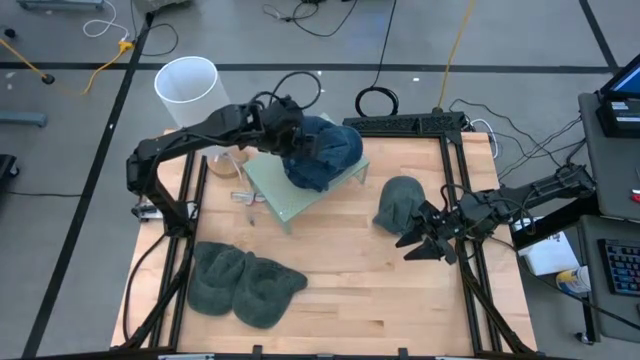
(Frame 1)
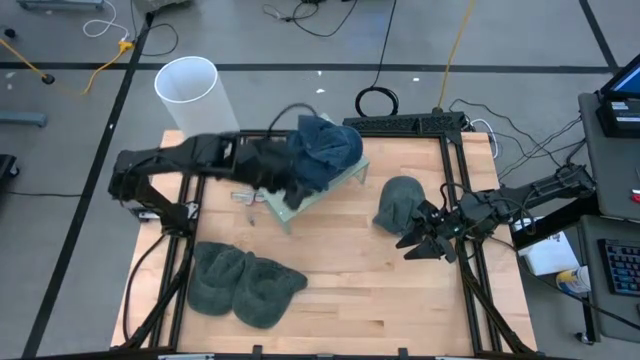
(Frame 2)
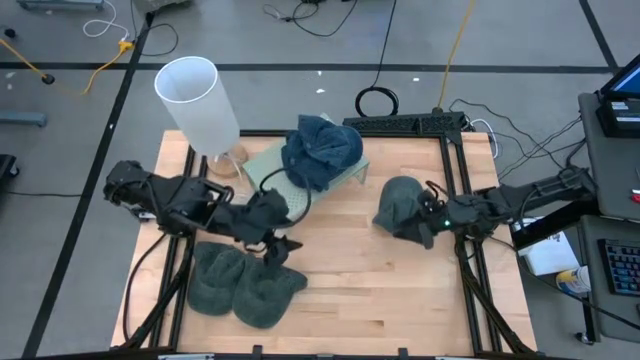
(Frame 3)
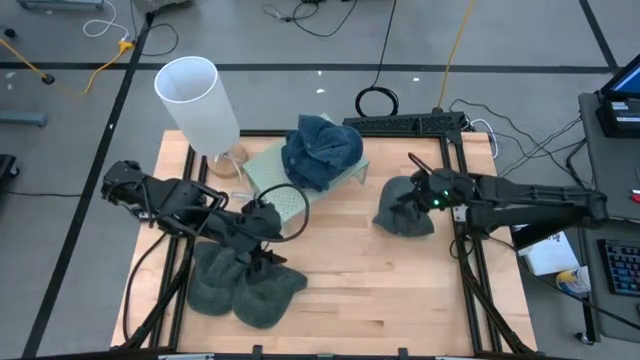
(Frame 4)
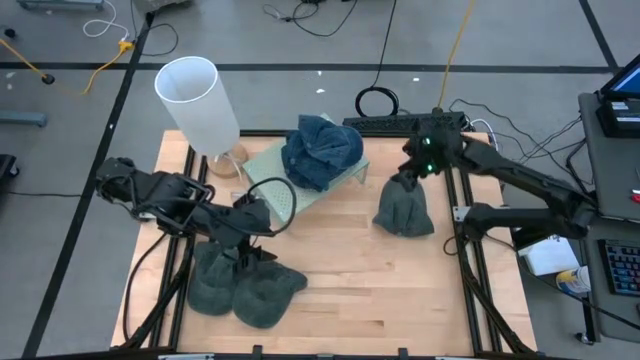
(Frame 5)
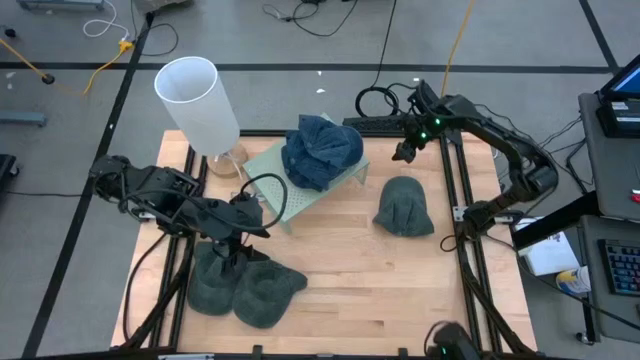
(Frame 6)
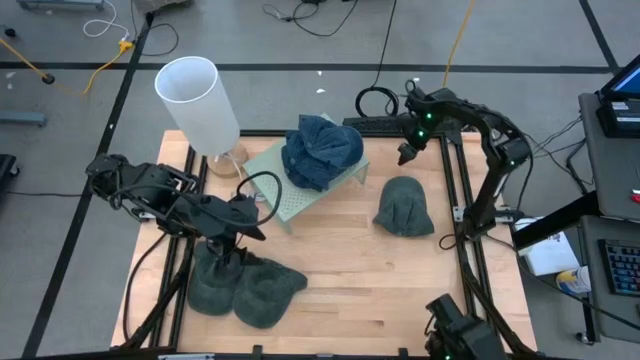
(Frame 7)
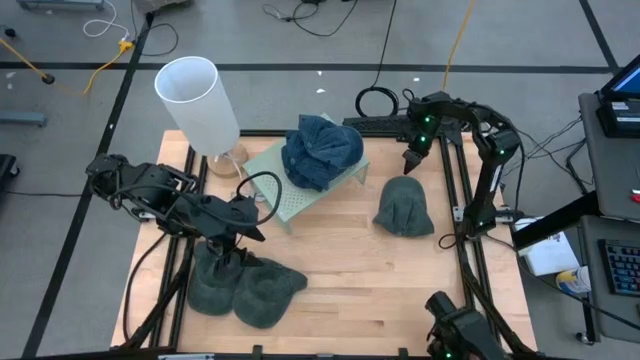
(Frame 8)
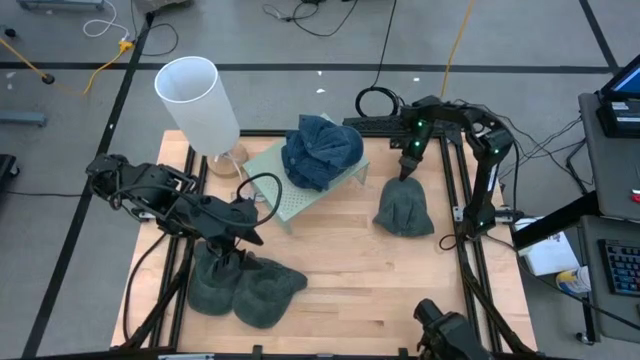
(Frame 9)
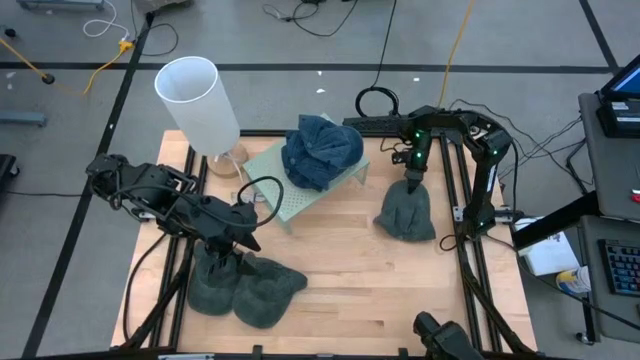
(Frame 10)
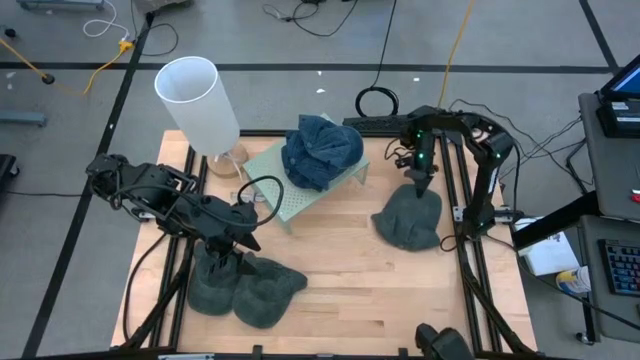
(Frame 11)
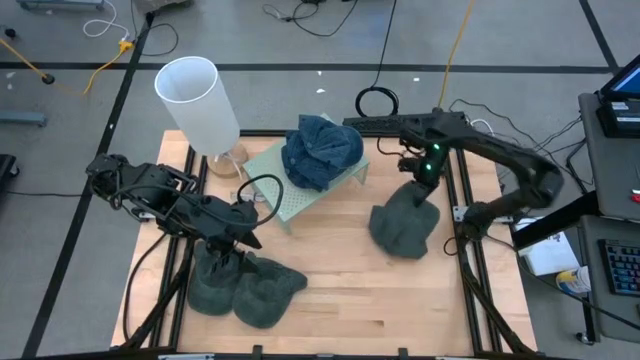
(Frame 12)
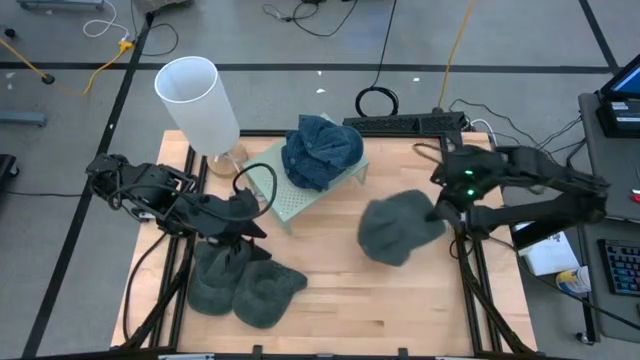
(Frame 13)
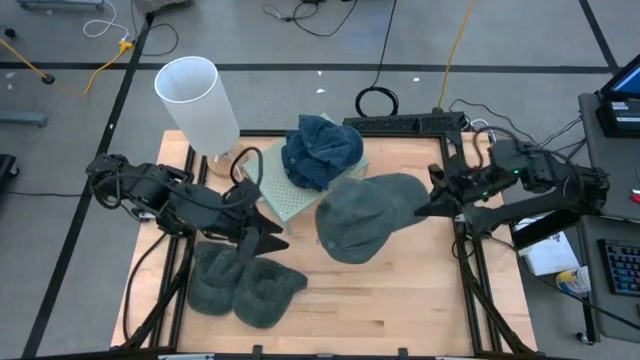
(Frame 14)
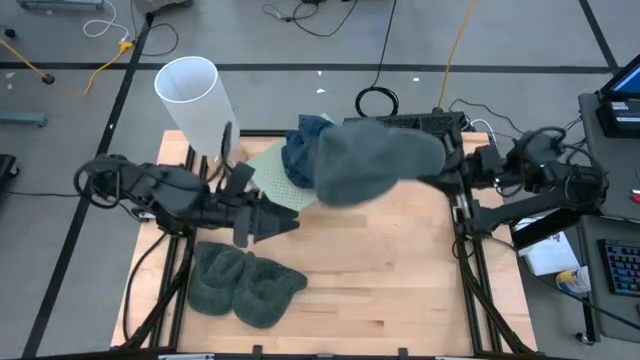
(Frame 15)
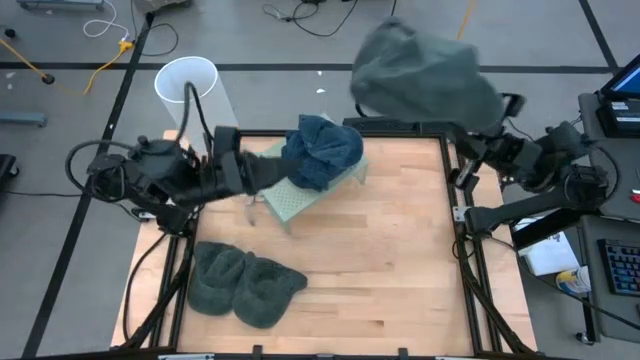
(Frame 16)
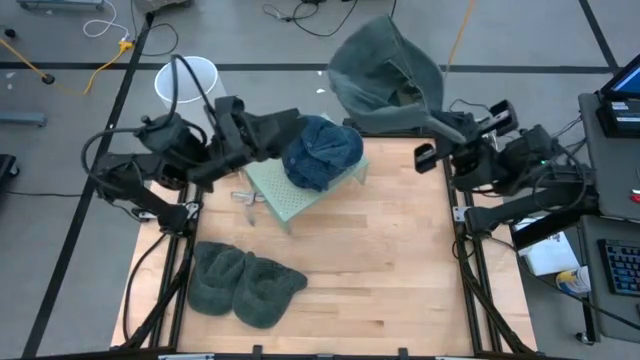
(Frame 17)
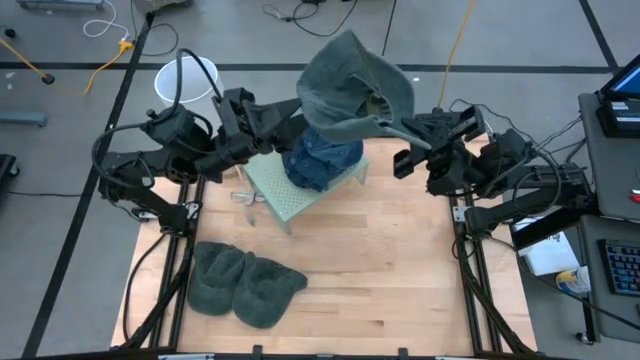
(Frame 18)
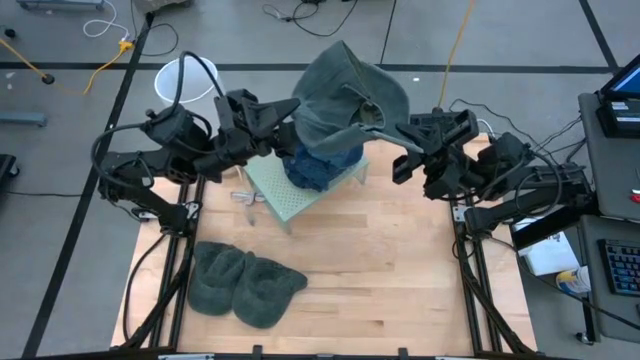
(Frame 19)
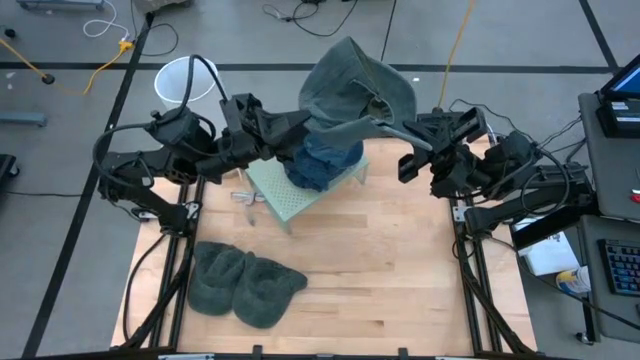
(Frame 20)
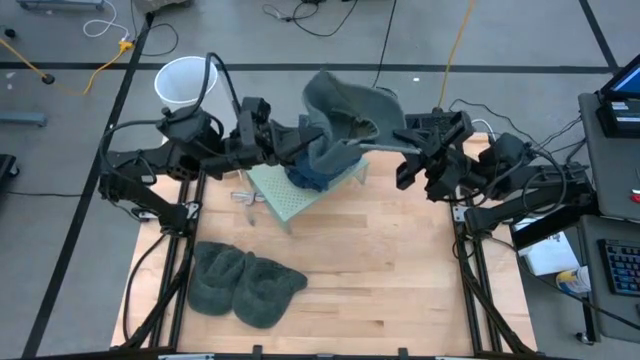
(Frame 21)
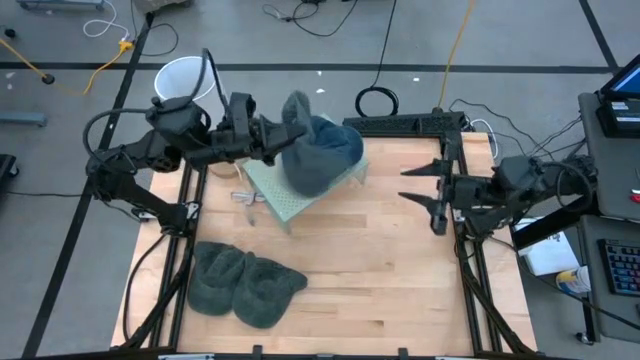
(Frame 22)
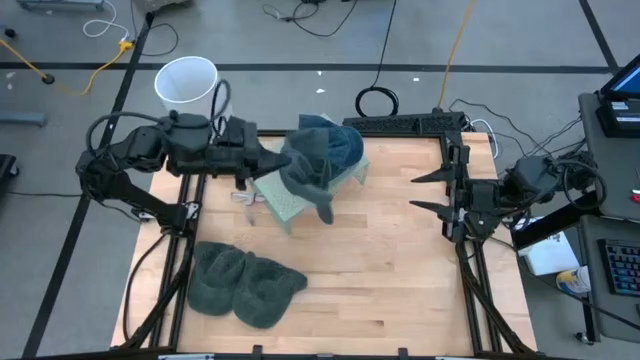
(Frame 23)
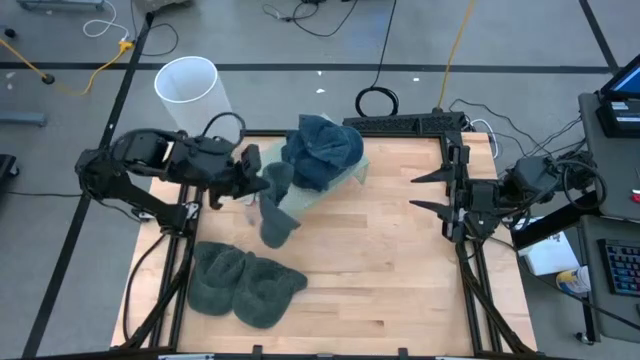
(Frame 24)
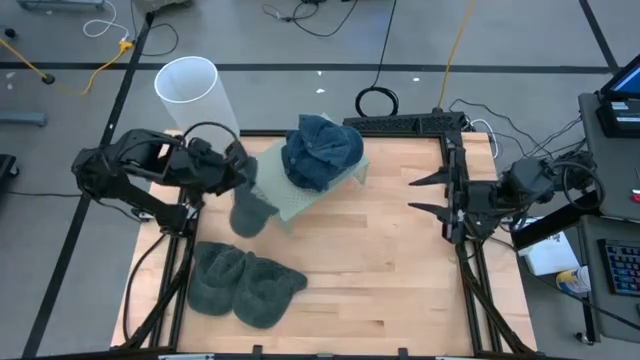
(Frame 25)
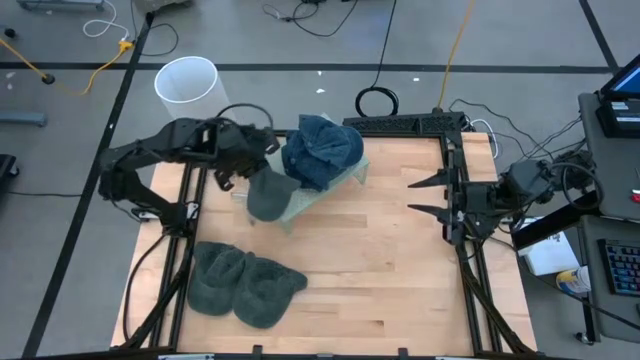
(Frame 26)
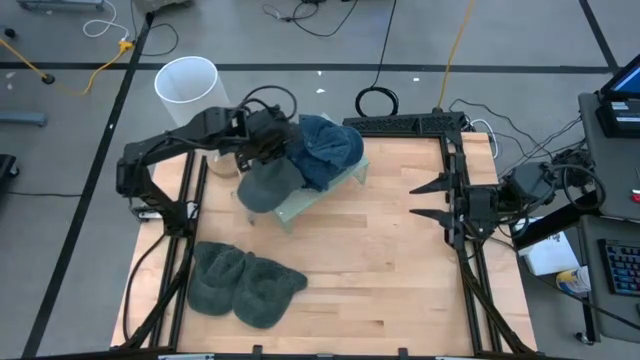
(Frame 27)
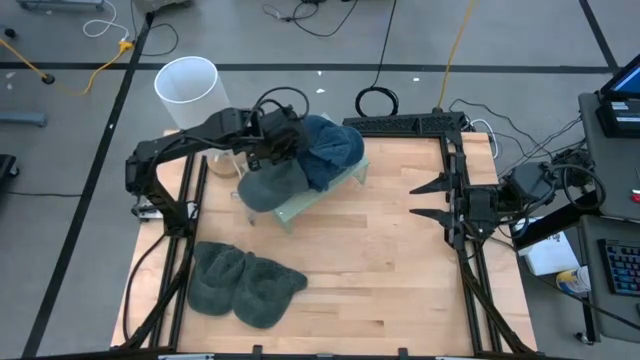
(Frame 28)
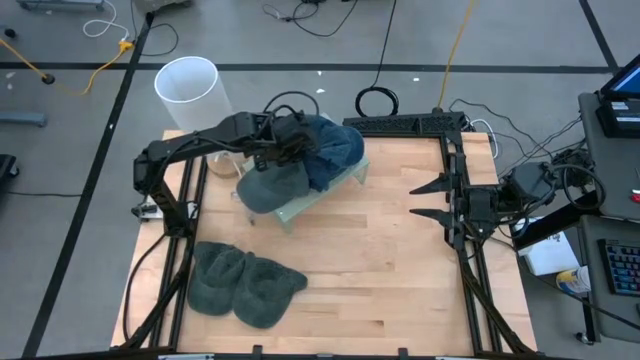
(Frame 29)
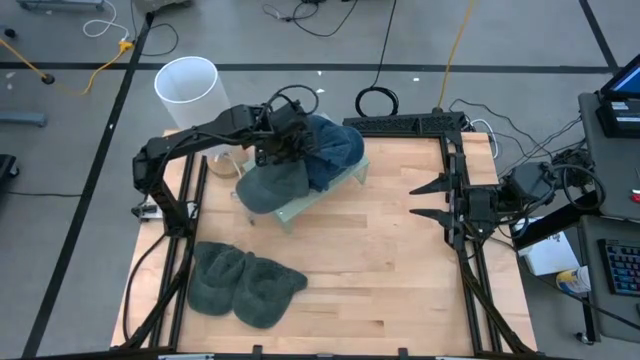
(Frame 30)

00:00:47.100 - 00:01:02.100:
Task: Pick & Place hat
Put the top green cap on the shelf
